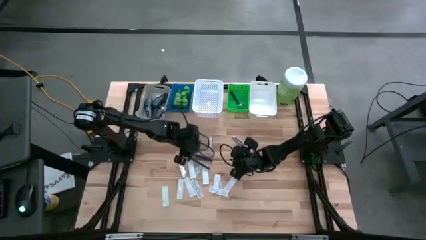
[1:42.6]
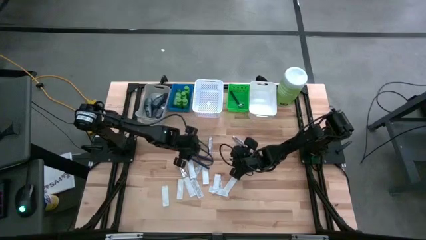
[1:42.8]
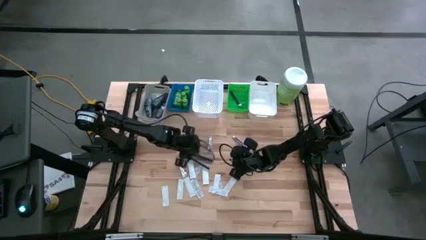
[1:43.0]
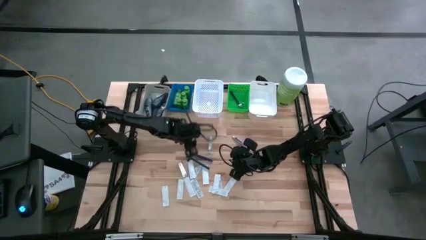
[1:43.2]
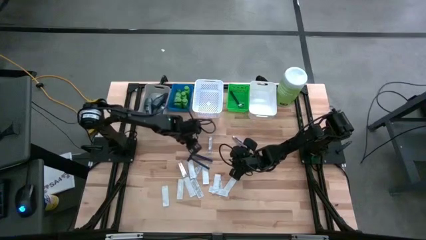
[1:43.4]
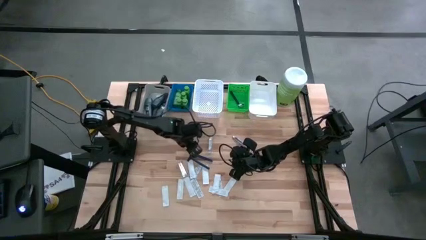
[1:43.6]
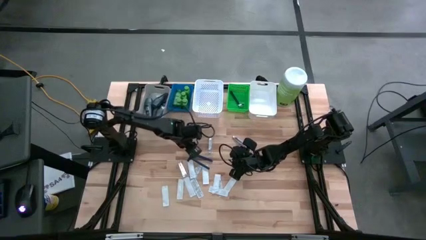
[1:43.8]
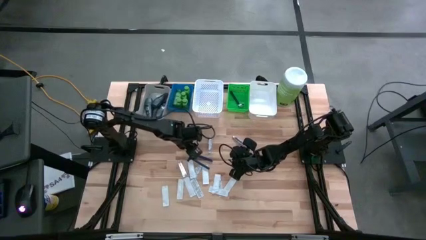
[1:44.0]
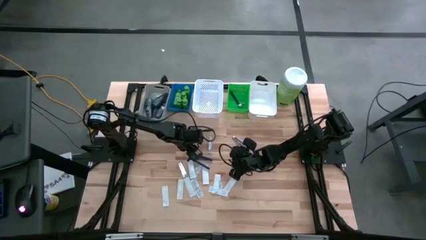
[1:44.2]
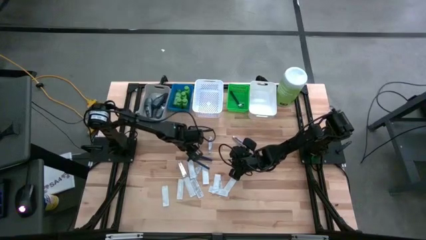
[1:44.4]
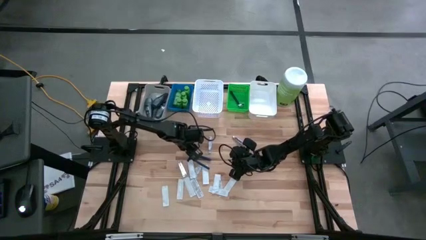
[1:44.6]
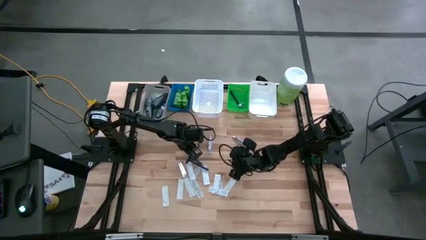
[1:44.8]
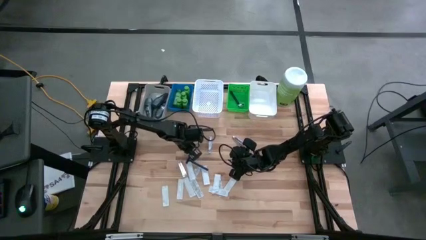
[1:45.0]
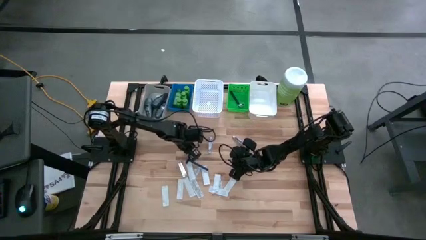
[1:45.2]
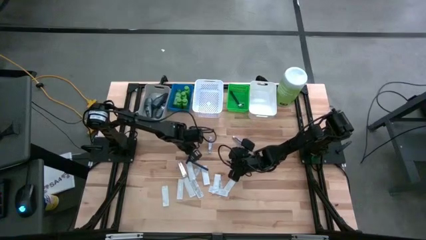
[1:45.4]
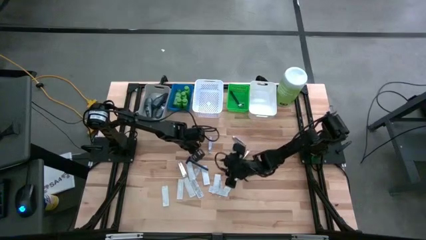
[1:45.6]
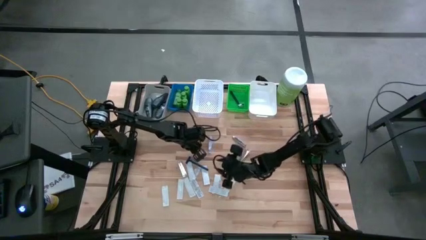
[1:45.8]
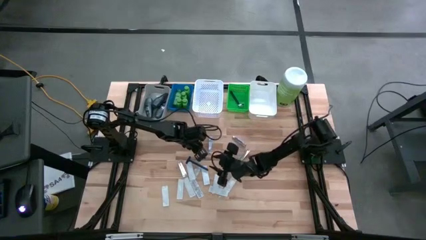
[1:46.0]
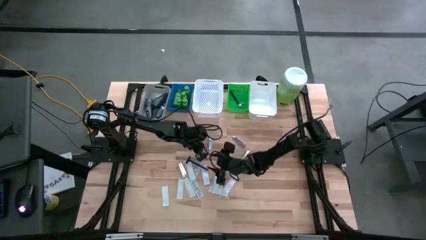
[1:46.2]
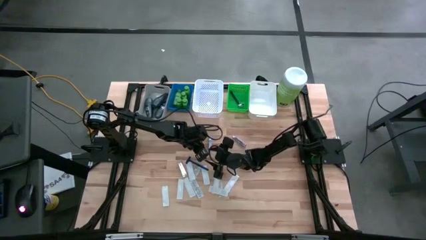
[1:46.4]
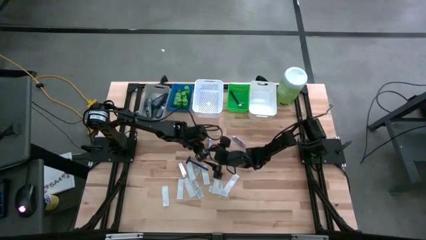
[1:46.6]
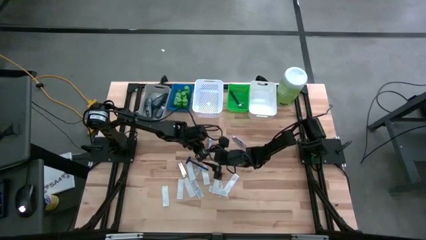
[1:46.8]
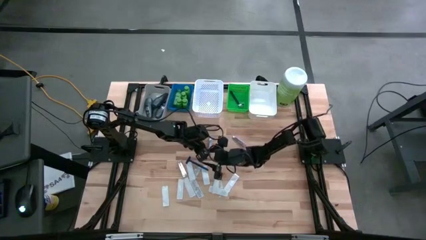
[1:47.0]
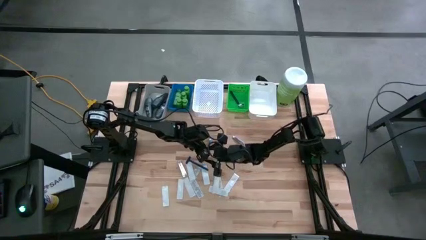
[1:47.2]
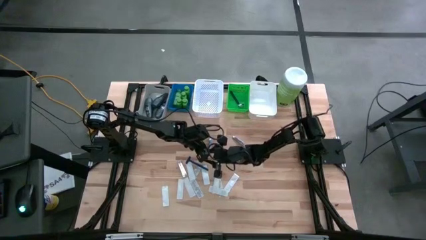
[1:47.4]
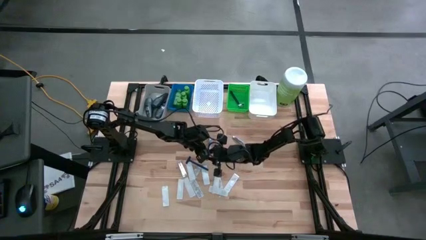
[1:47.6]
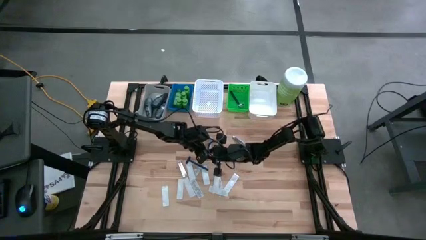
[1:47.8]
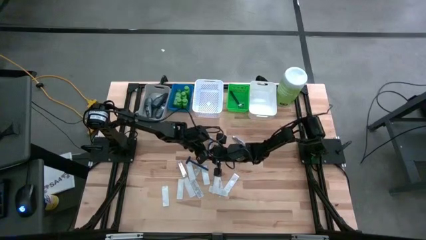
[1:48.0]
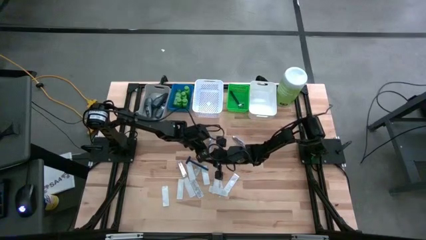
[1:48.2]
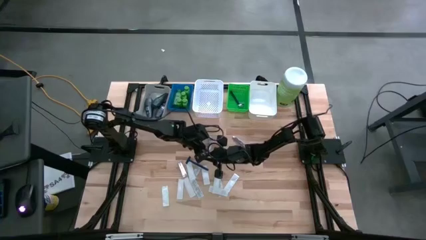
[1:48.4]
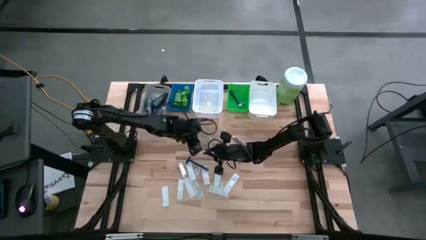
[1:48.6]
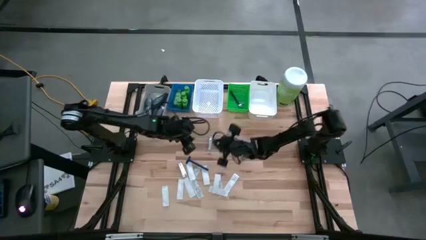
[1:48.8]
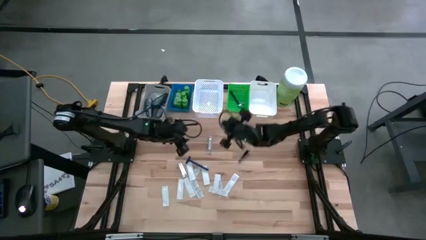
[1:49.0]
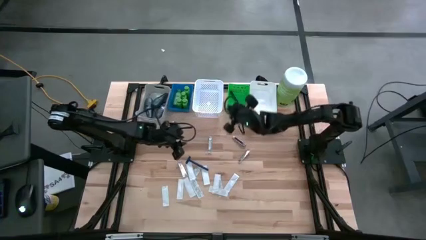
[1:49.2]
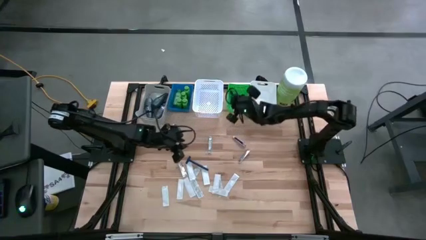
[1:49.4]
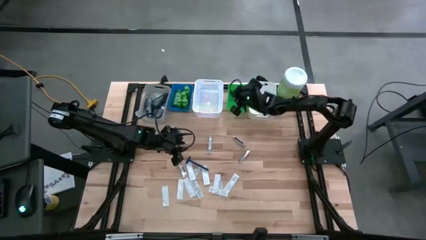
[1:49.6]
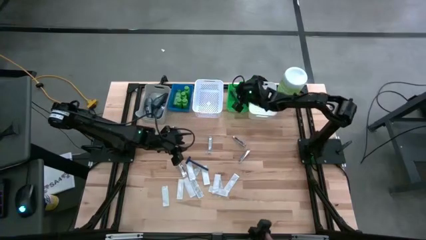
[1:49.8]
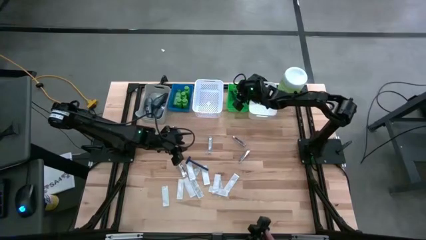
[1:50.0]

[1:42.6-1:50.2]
Task: Pick & Place Travel size toiletries
Put the razor into the green bin

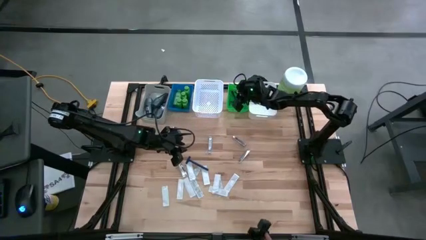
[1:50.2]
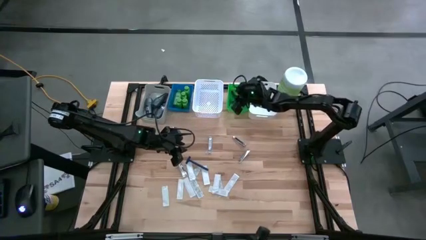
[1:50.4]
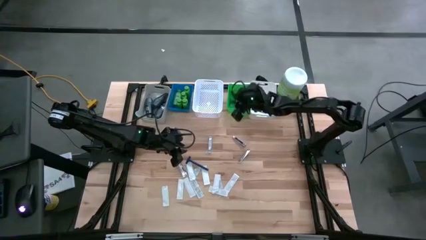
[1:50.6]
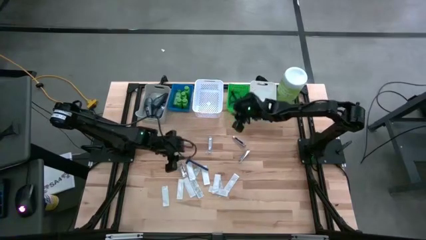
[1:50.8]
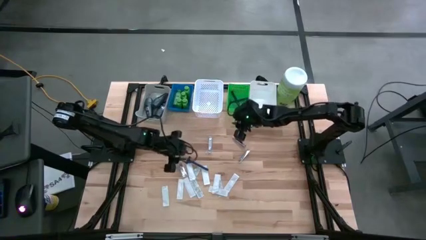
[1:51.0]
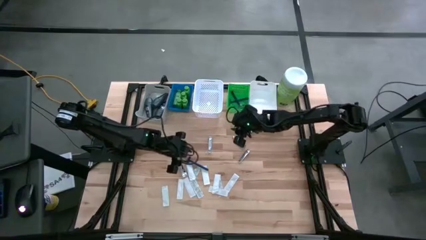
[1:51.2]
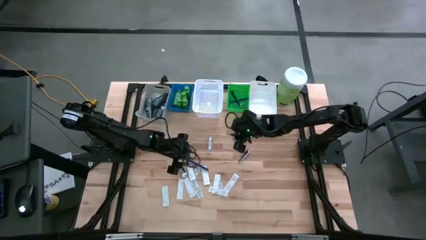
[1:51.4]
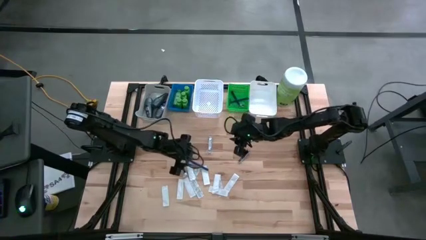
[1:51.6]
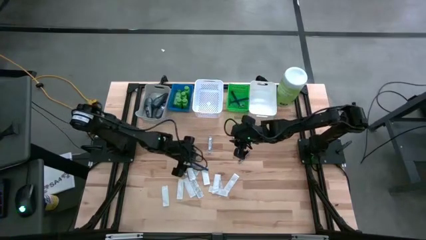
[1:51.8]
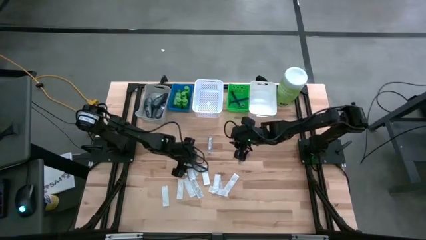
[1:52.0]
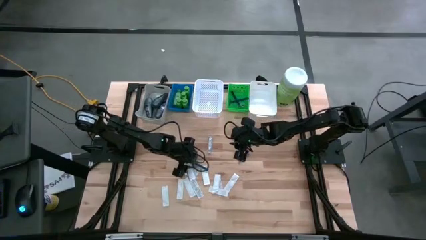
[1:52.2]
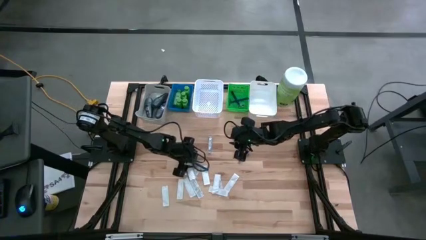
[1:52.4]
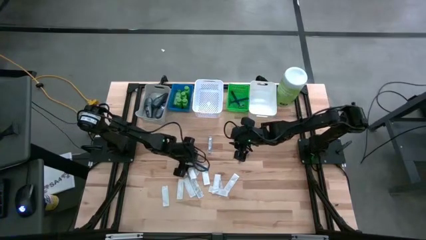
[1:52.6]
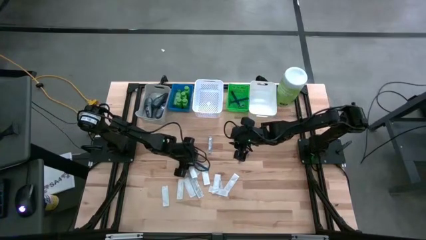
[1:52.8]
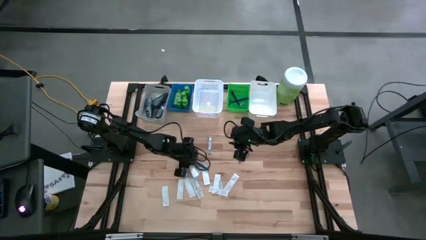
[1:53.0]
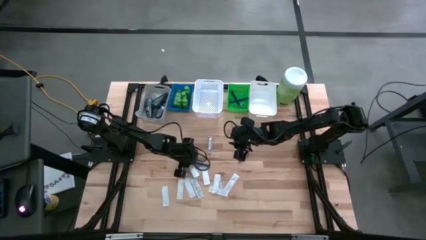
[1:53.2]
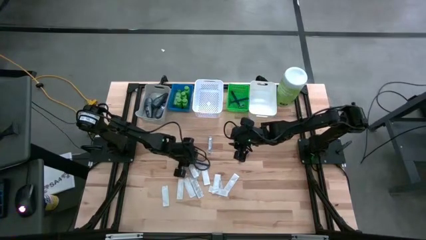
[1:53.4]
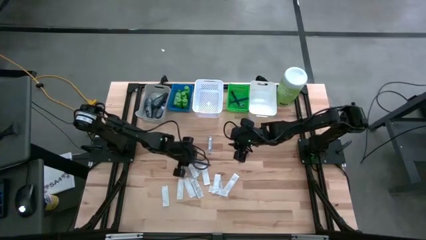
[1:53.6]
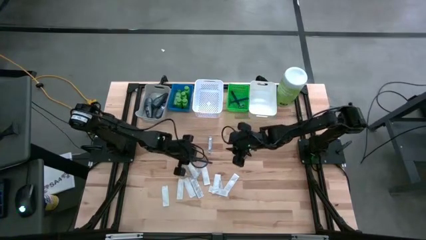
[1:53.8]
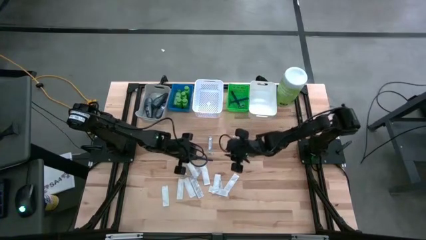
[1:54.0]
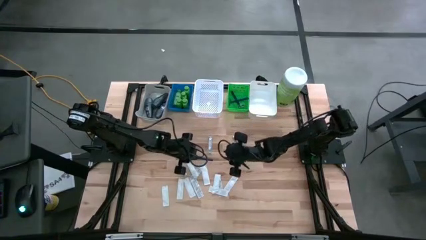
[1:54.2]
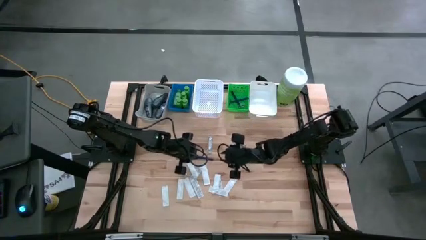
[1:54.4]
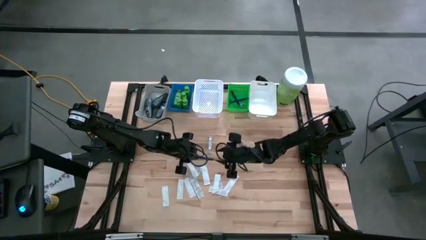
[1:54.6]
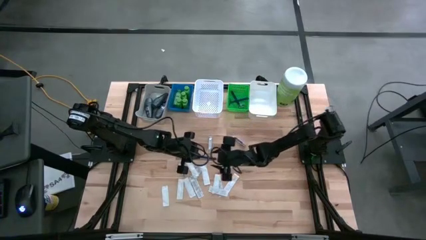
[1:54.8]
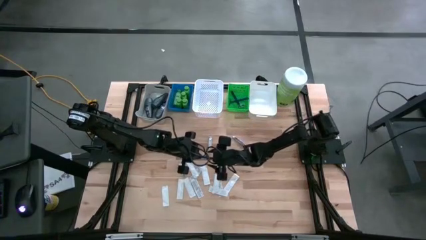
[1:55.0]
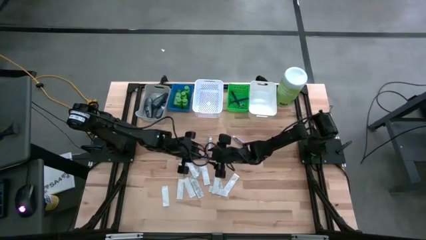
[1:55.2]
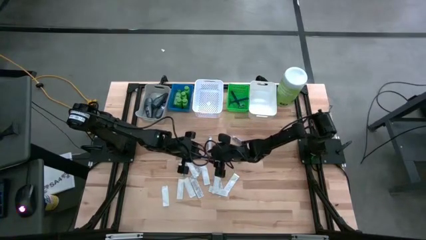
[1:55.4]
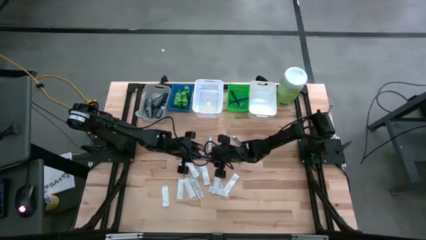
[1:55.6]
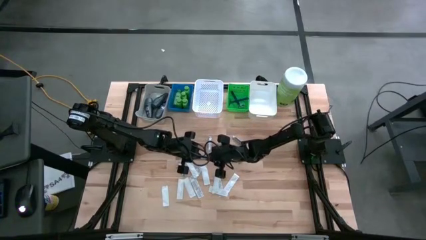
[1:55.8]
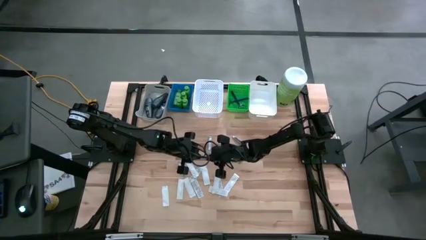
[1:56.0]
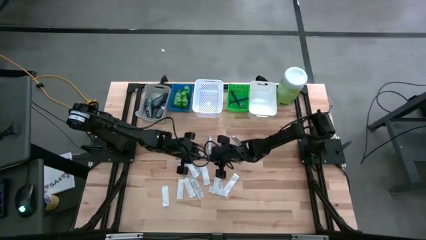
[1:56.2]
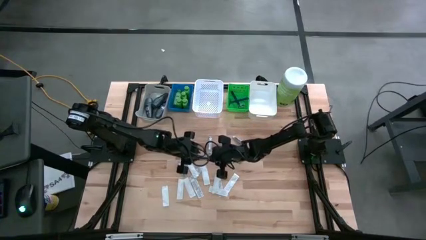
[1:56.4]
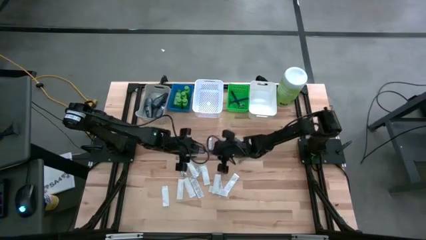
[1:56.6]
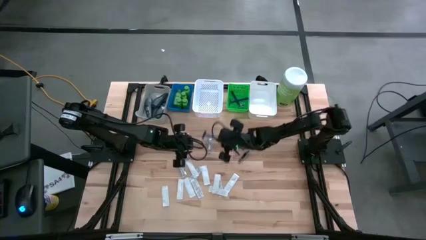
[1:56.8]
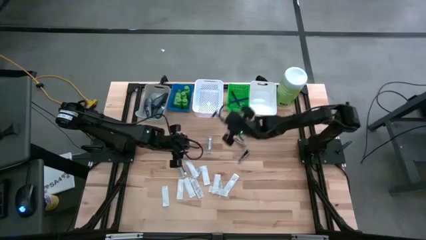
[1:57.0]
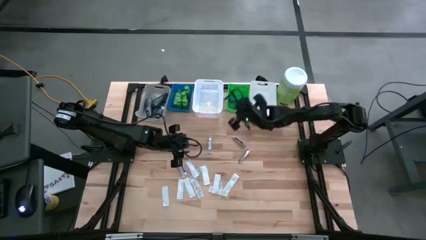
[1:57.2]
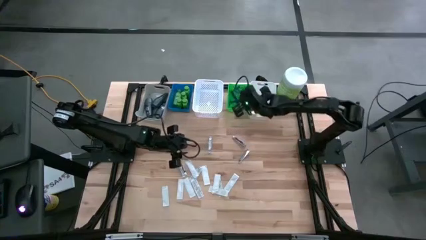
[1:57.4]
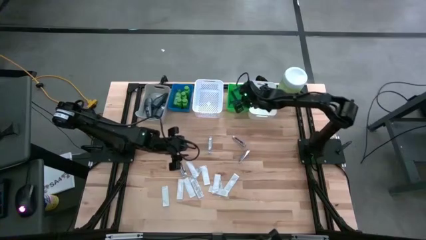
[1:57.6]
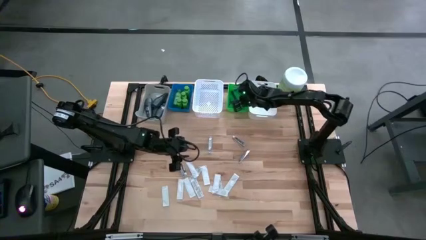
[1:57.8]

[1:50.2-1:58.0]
Put the razor into the green bin
